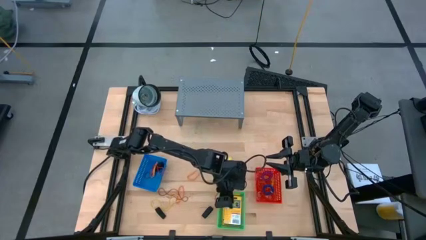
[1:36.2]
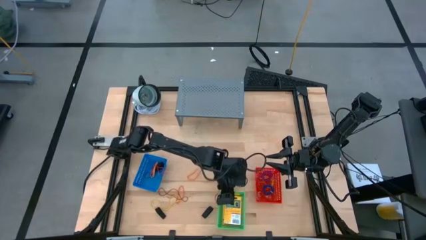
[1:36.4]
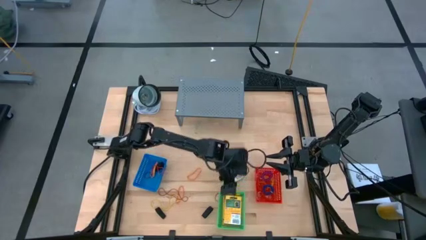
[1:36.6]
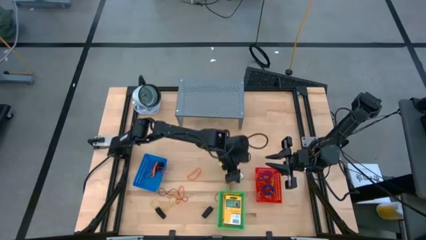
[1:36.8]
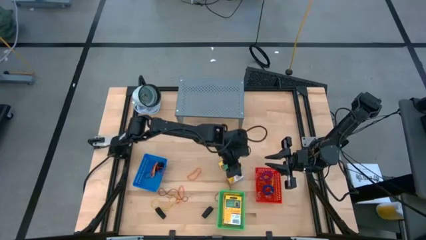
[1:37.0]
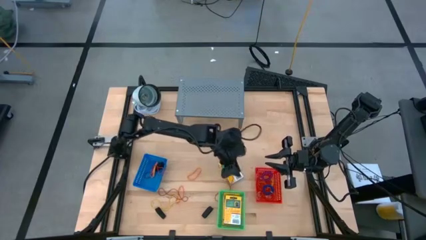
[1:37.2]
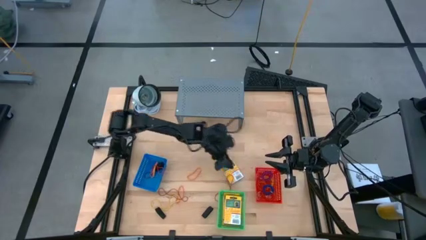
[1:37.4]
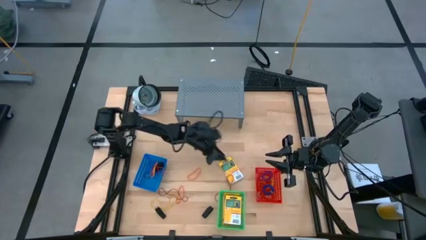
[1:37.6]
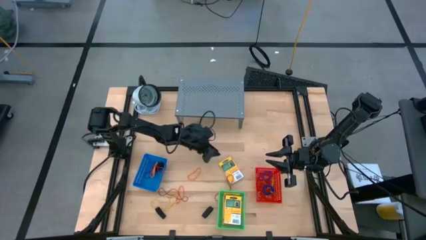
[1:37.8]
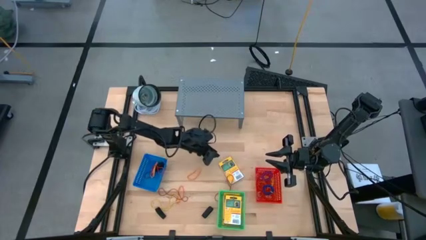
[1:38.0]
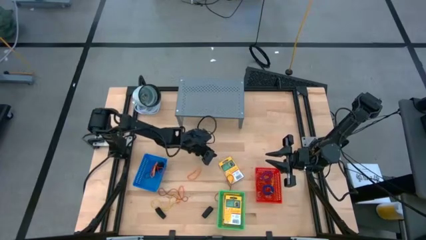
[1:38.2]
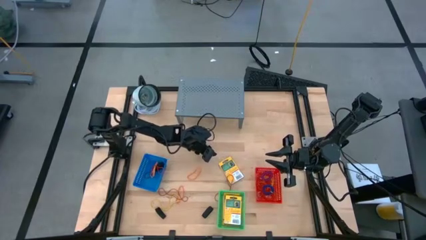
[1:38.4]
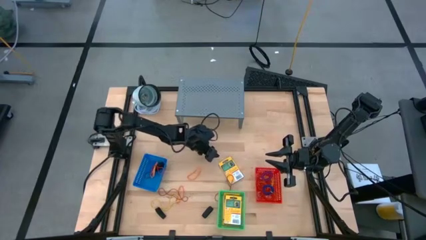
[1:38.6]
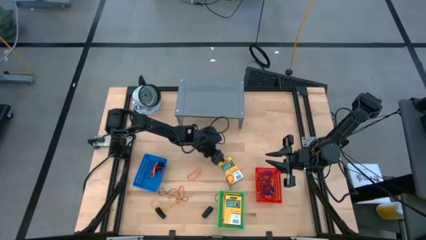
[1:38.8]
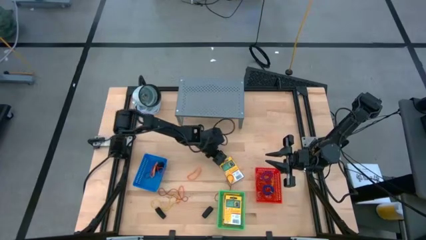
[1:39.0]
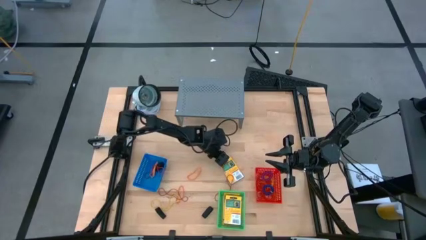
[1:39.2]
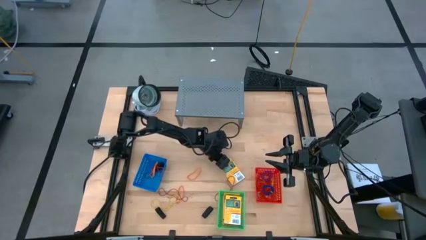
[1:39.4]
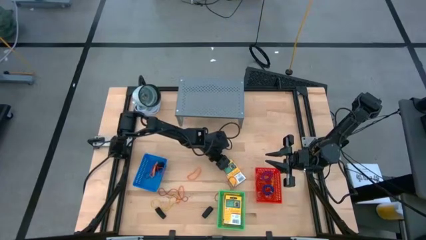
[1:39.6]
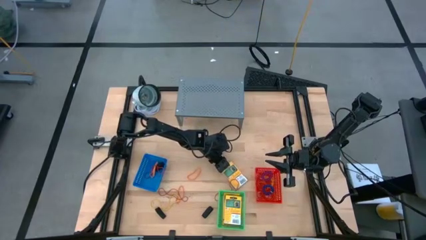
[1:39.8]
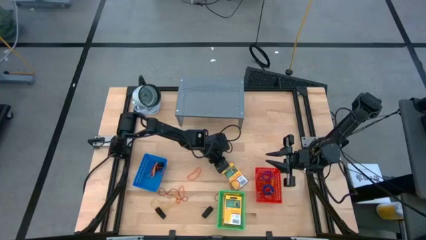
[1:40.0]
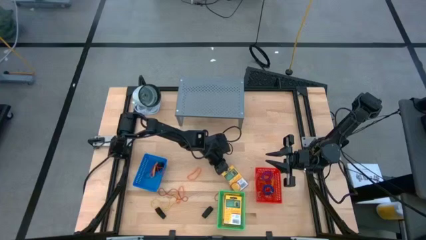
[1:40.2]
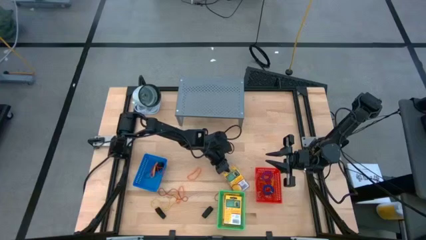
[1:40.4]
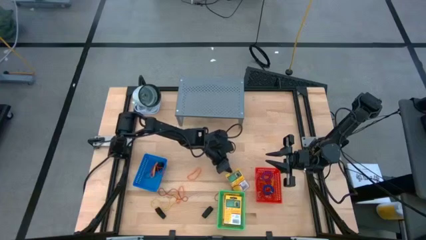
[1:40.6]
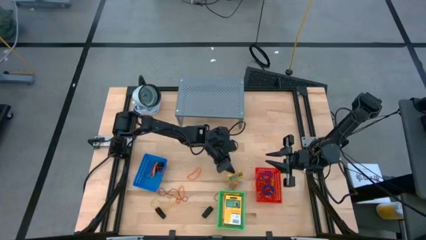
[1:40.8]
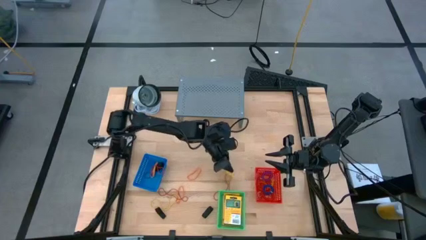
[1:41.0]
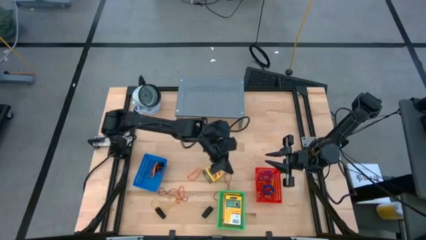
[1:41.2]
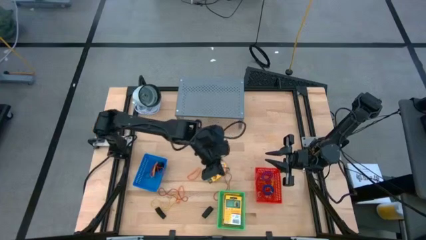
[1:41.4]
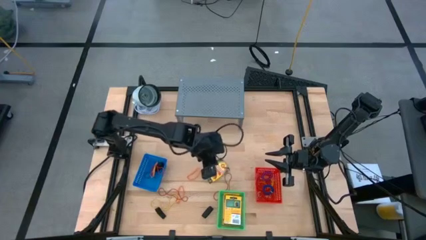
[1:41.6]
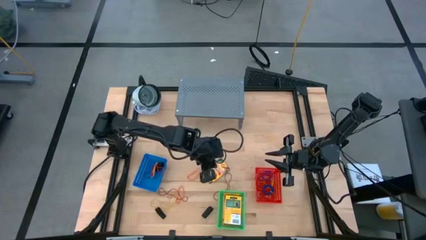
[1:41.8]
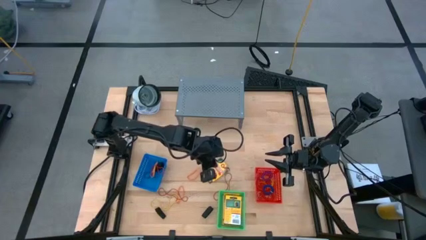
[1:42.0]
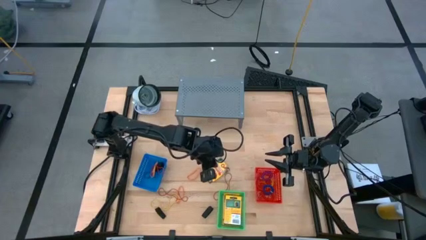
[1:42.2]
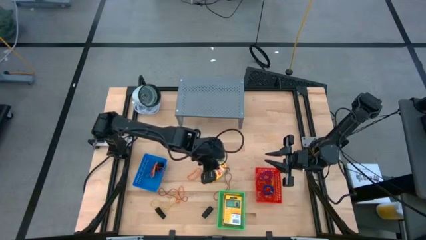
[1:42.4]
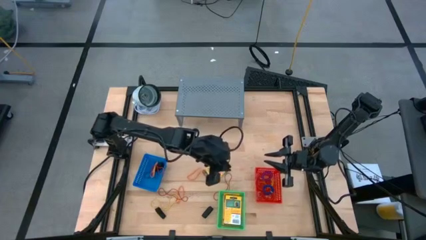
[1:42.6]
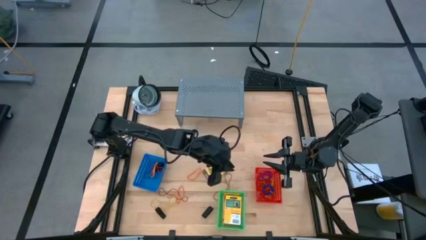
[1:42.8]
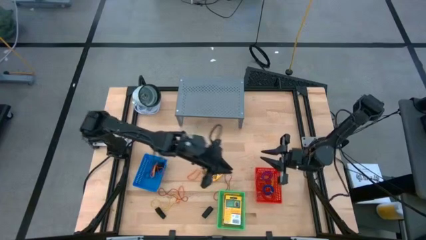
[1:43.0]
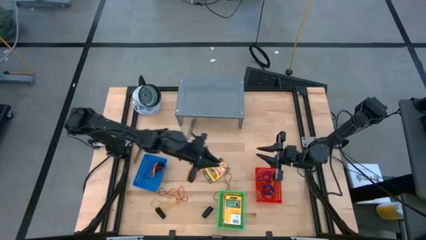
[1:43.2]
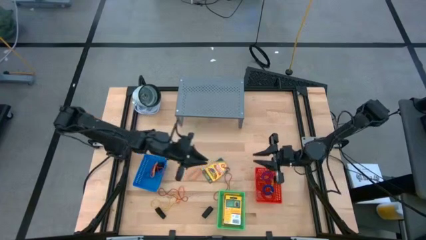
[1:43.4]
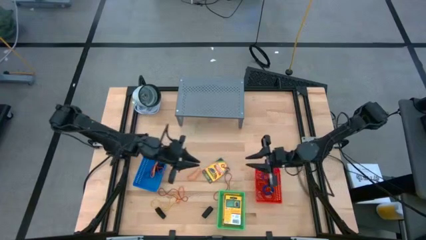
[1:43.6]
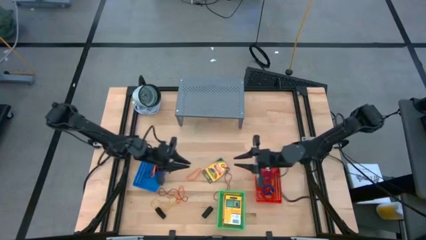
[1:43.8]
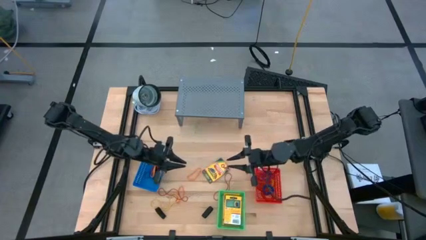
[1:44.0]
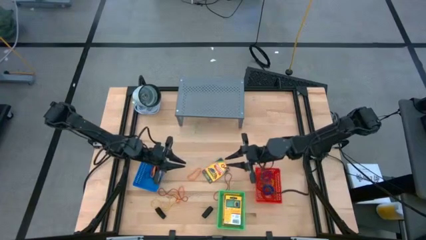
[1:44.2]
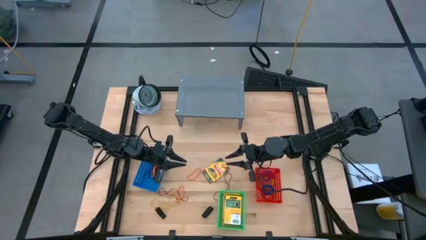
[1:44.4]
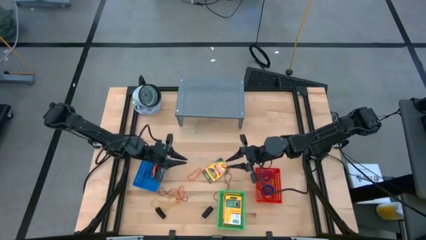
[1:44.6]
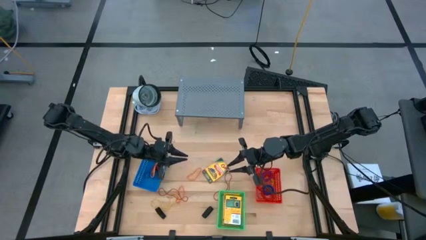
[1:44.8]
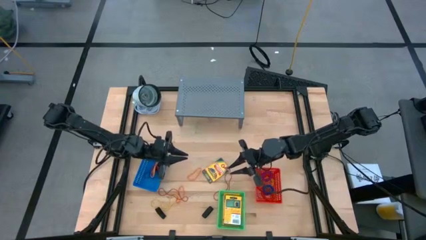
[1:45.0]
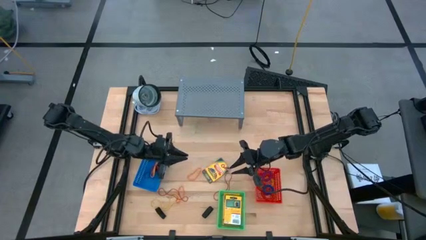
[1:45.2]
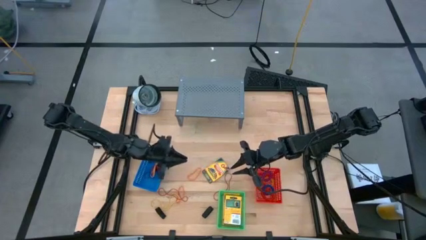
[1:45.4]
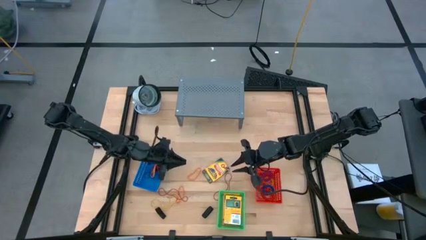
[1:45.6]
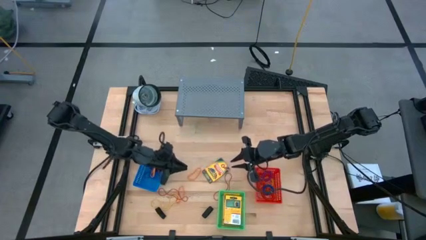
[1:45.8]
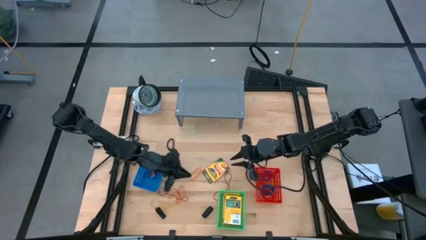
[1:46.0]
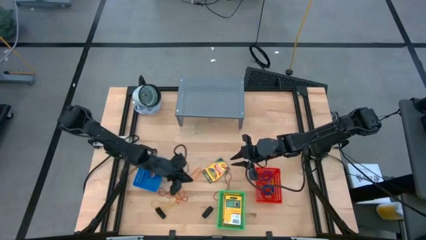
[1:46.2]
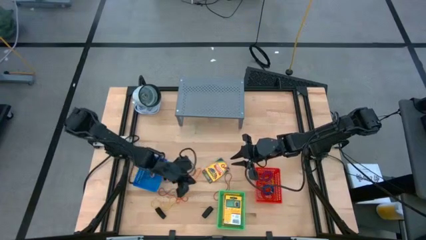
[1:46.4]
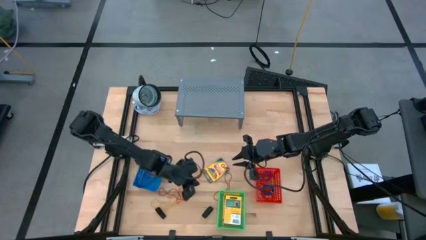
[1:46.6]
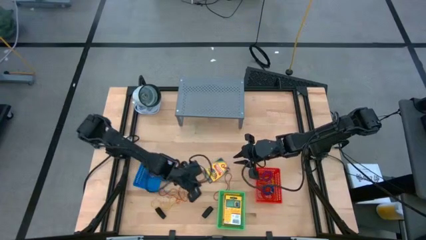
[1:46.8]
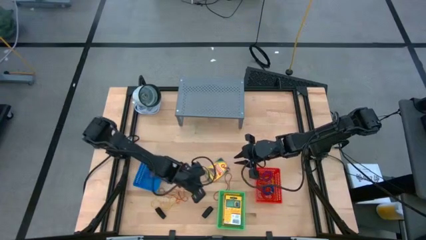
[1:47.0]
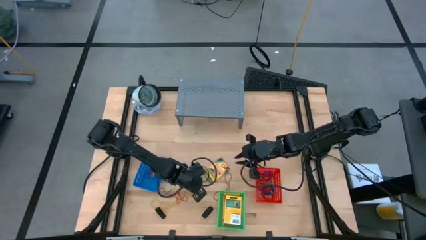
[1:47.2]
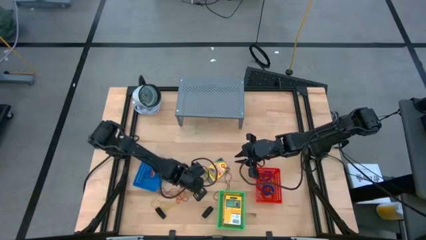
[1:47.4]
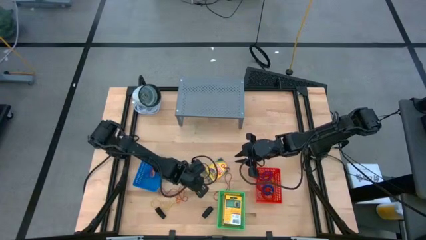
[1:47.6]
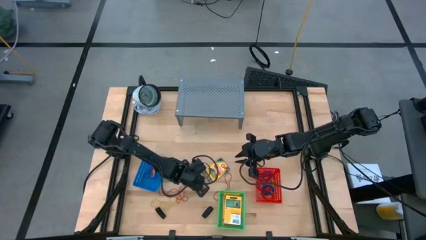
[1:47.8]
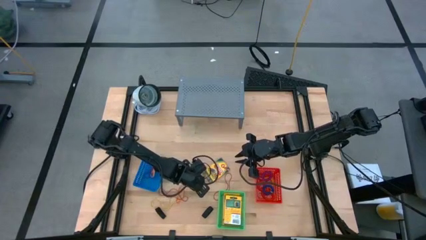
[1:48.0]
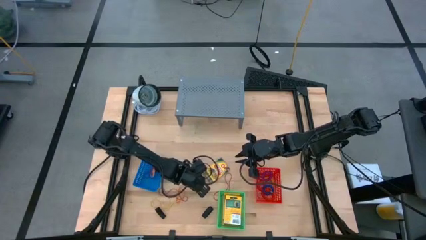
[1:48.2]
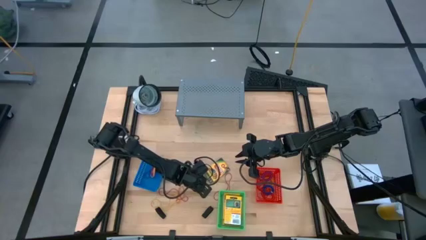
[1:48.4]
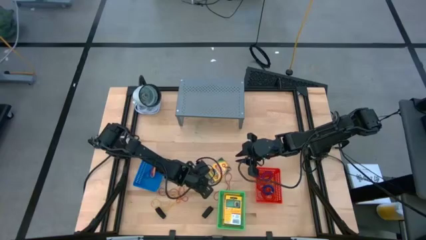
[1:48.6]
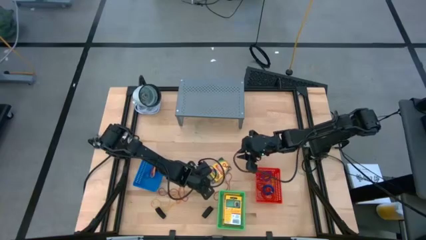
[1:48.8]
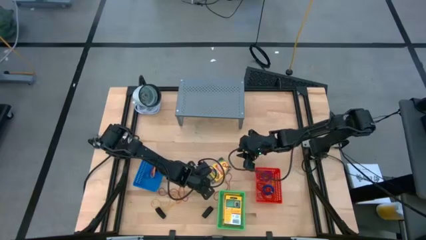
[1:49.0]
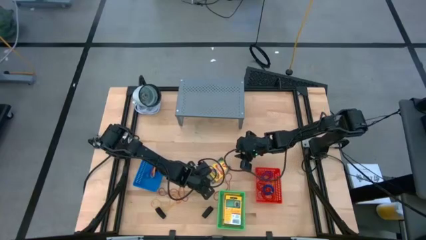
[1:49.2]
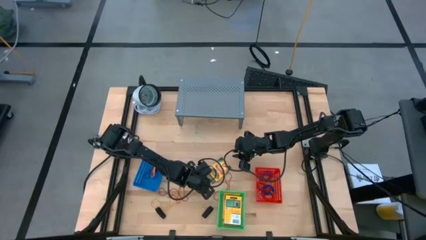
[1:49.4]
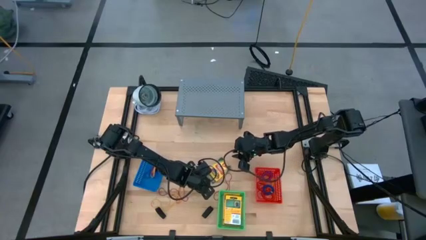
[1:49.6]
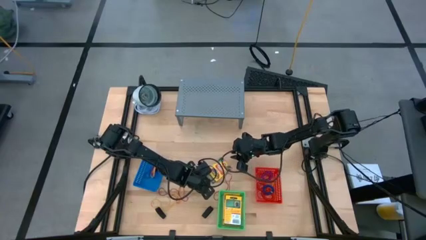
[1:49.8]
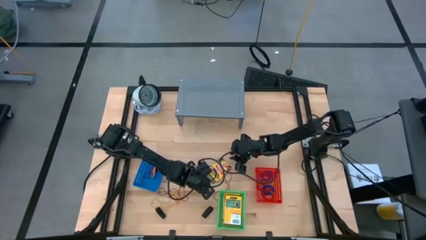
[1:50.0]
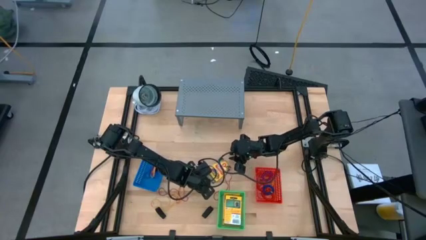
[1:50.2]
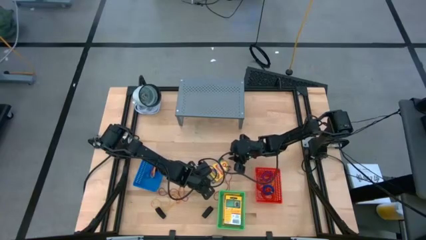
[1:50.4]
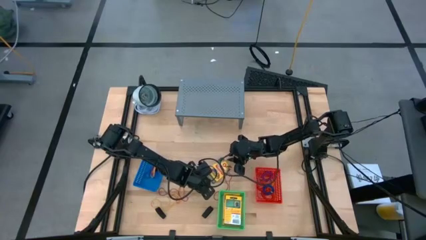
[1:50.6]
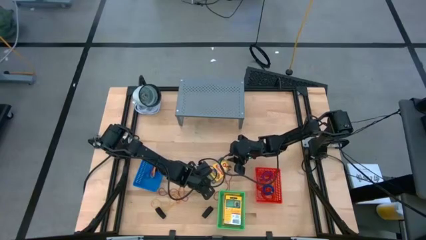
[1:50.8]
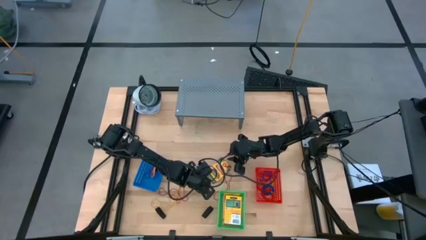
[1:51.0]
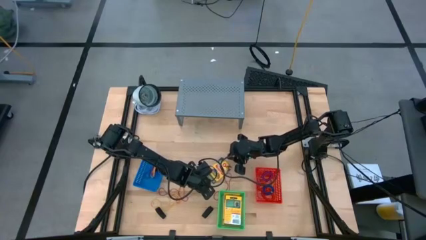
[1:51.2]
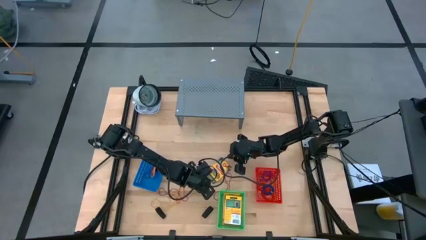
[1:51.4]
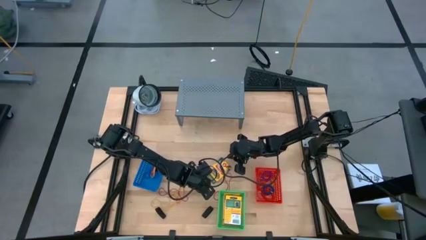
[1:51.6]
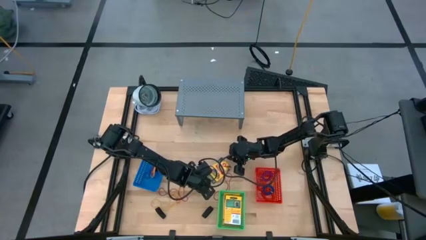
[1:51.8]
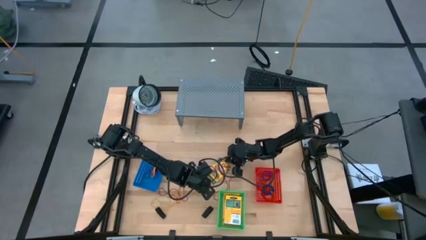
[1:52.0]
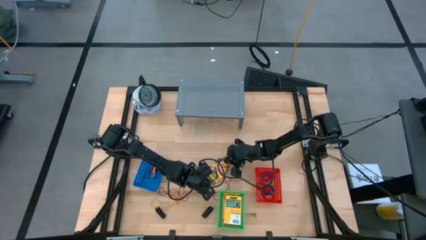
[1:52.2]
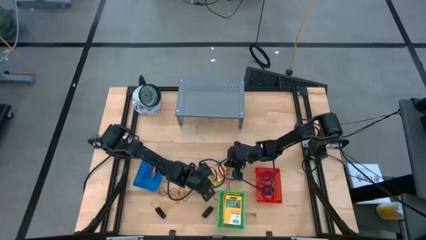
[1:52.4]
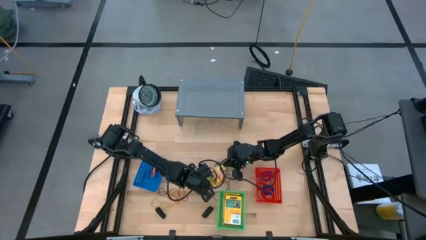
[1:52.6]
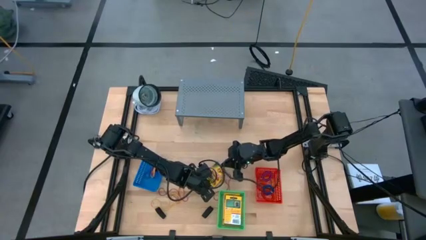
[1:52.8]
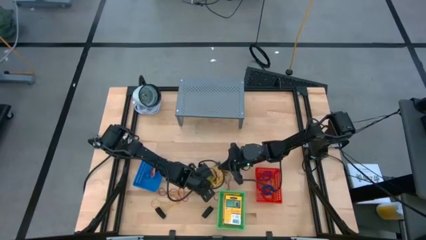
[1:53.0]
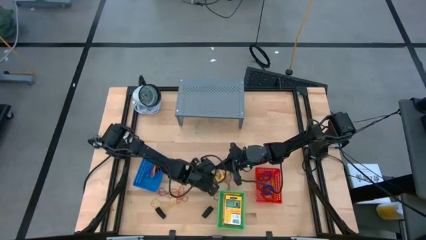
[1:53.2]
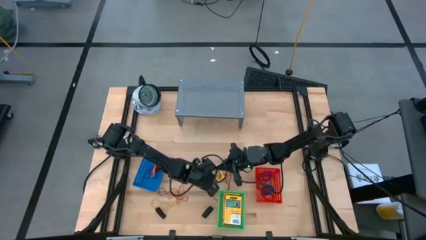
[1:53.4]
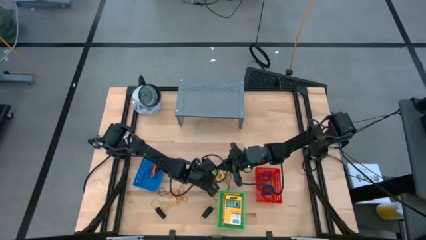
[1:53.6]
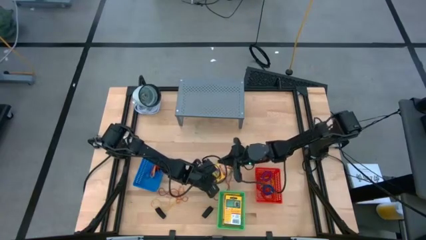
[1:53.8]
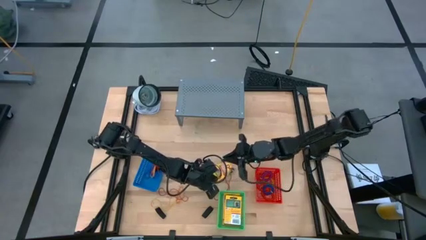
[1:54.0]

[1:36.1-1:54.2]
Task: Pick & Place Office Desk Supplies
Put the yellow crayon box into the green bin
